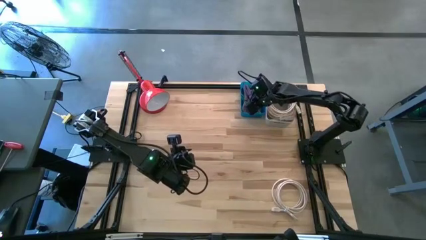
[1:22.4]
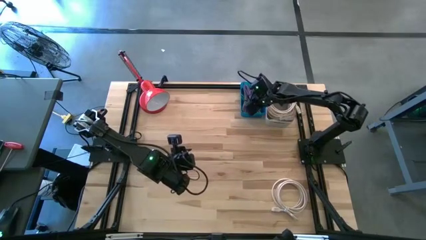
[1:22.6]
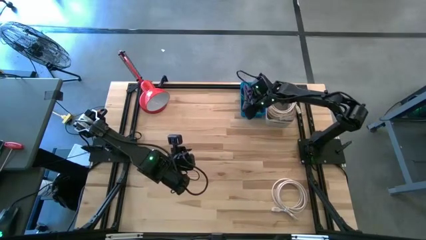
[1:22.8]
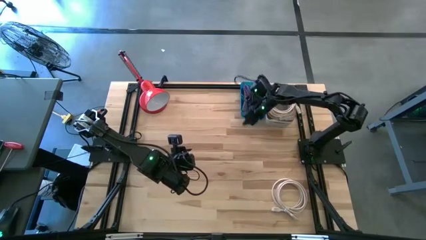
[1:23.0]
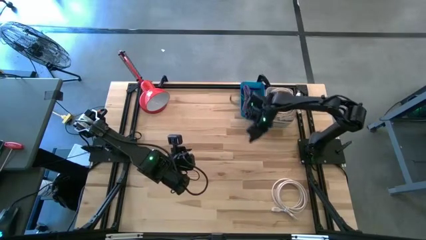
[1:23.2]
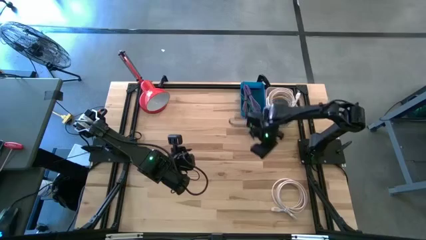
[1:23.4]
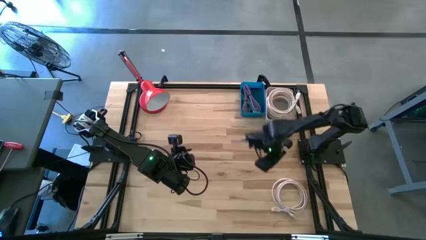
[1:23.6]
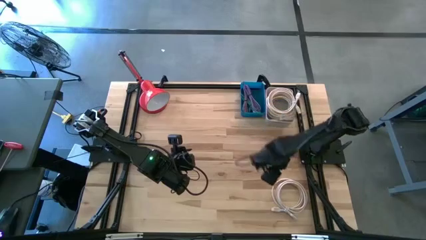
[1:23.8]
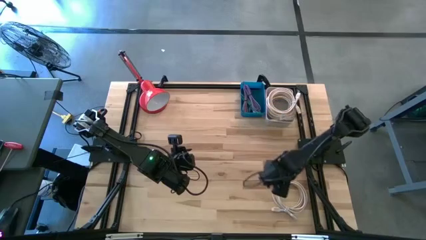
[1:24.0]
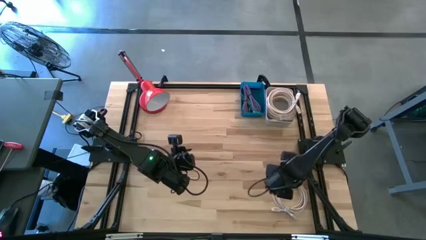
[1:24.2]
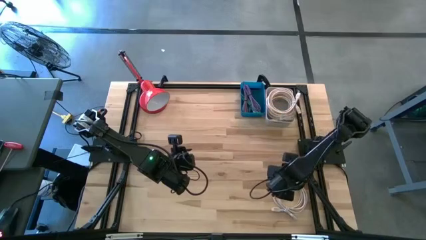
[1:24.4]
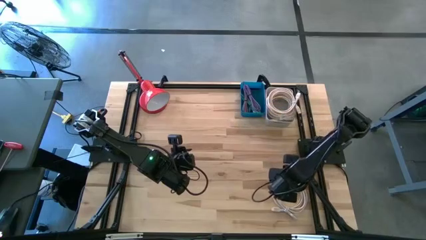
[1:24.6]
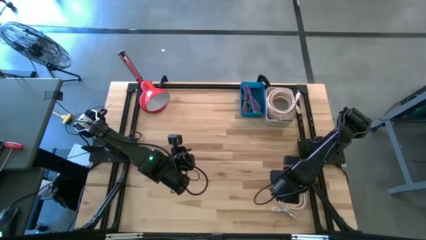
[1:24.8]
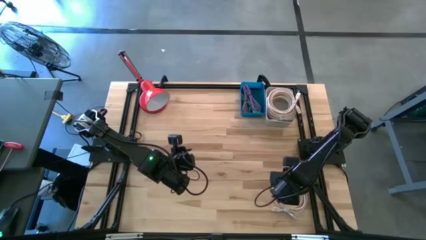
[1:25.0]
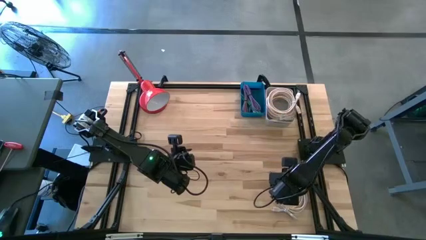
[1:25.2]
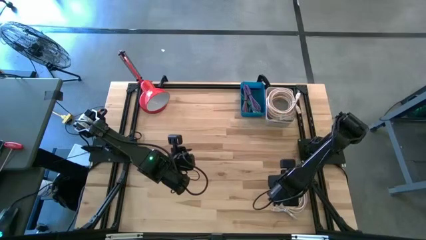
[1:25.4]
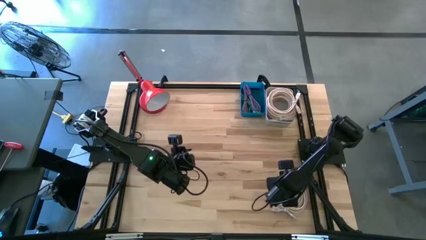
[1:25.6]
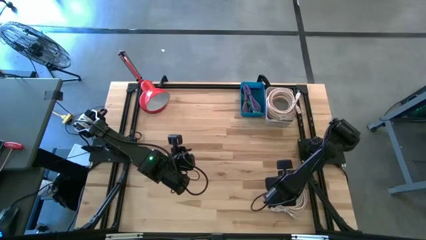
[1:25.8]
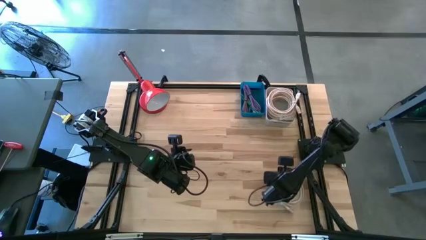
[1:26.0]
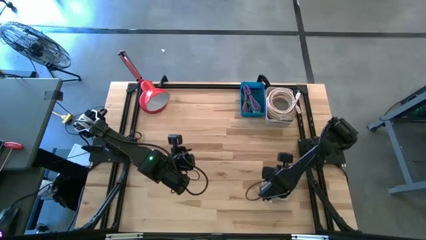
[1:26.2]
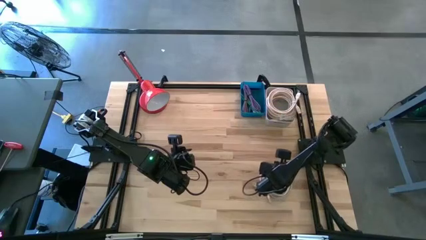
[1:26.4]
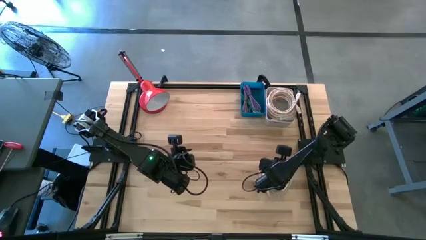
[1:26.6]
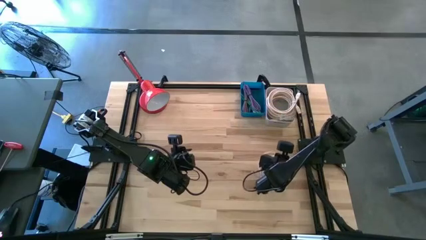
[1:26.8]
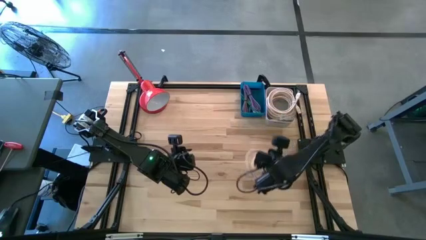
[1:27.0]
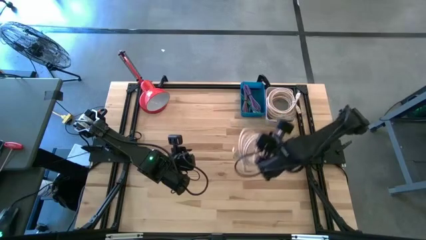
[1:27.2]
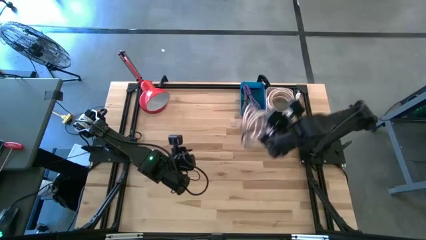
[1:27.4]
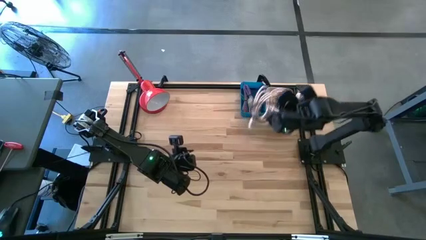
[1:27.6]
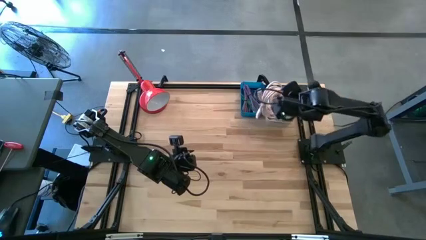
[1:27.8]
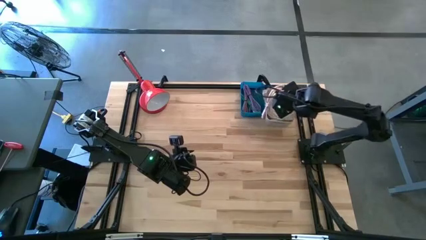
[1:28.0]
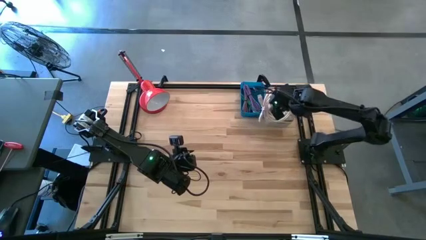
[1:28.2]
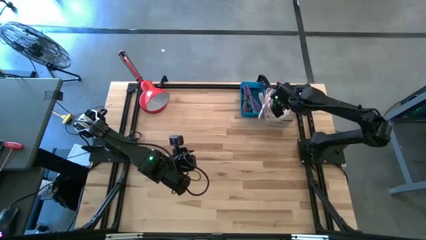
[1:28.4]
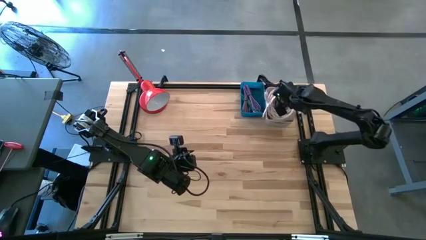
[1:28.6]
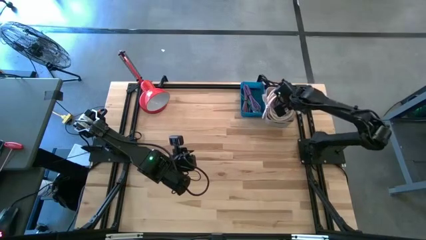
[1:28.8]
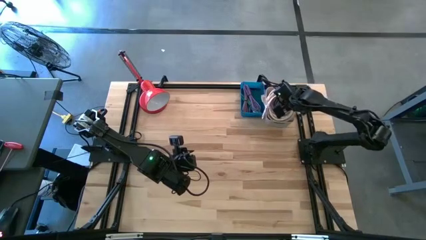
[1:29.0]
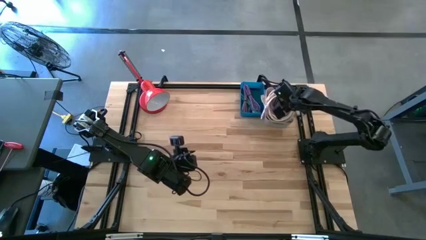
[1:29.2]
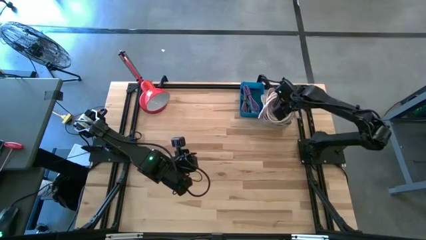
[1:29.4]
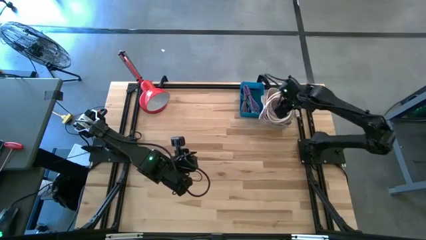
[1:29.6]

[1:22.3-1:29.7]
Task: Pick & Place USB Port
Put the white HDMI cable into the gray bin

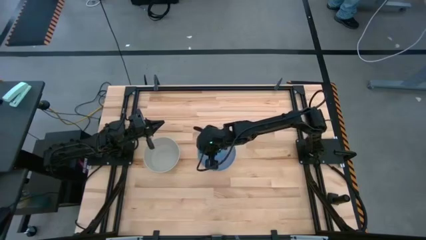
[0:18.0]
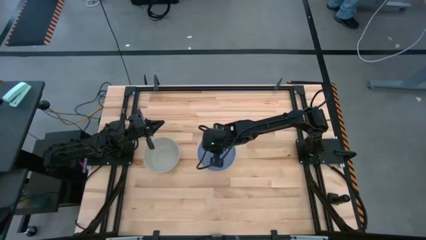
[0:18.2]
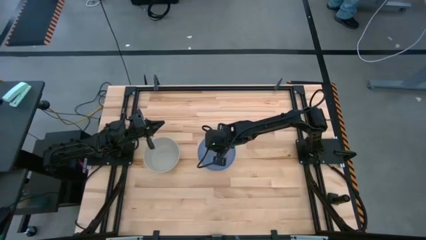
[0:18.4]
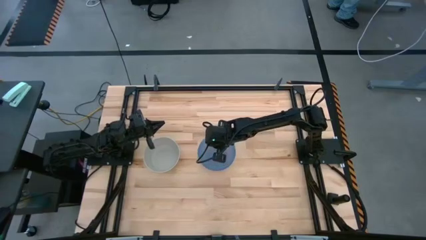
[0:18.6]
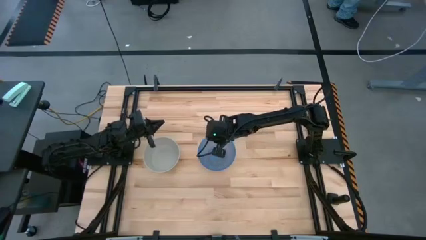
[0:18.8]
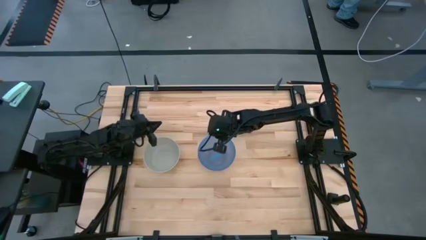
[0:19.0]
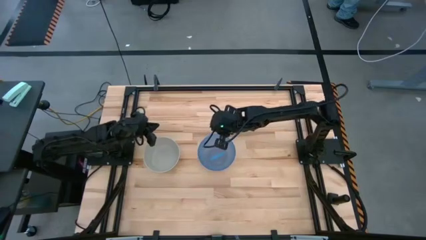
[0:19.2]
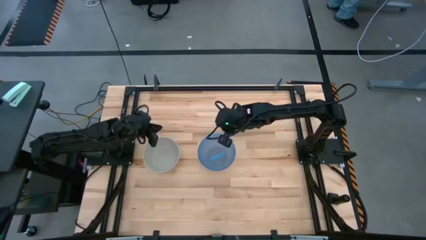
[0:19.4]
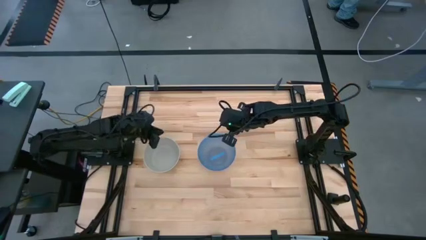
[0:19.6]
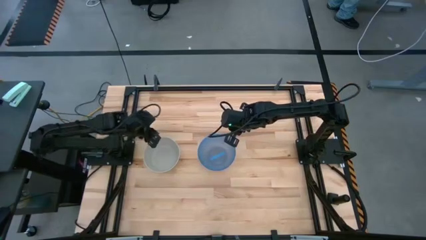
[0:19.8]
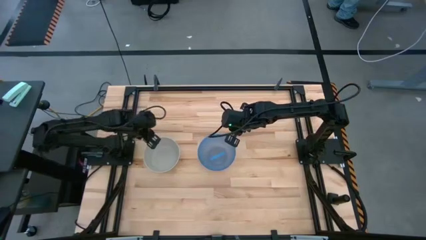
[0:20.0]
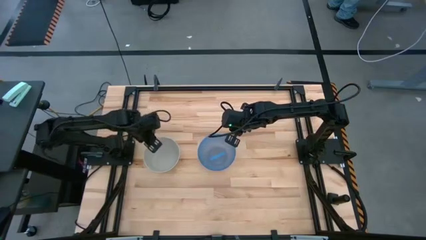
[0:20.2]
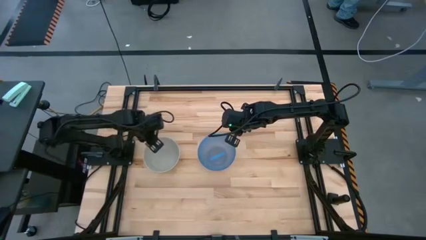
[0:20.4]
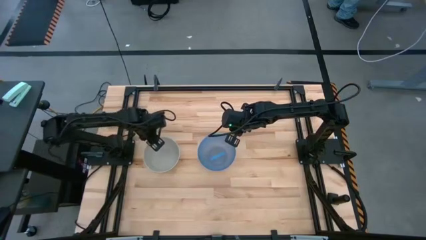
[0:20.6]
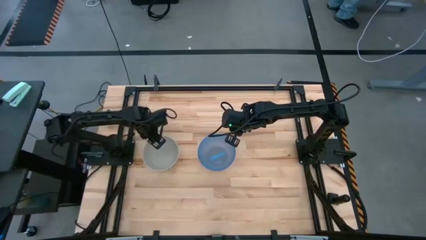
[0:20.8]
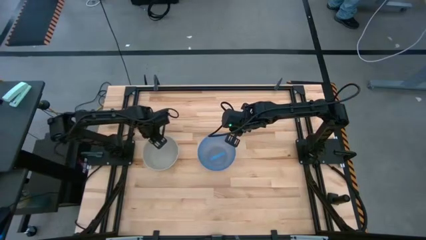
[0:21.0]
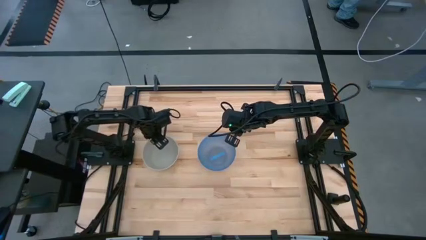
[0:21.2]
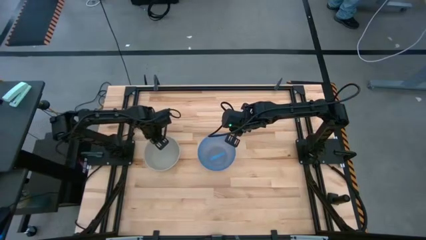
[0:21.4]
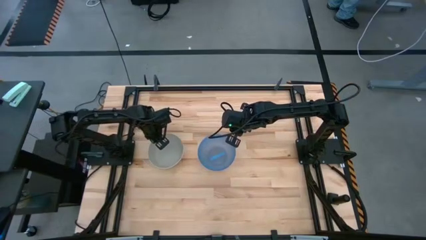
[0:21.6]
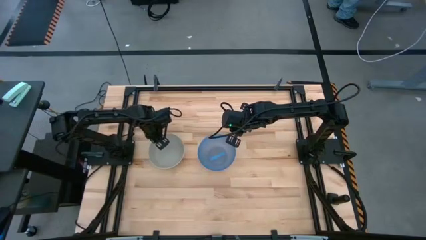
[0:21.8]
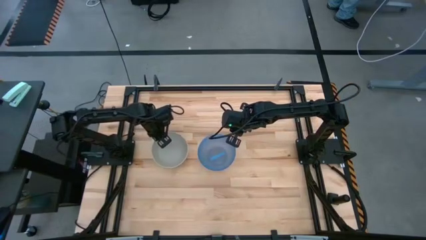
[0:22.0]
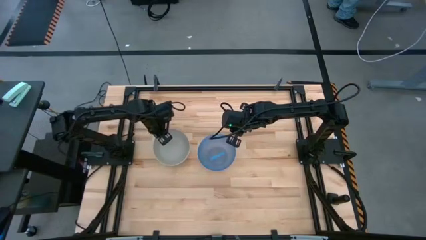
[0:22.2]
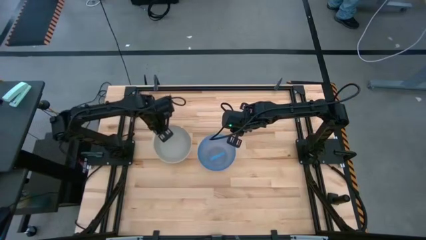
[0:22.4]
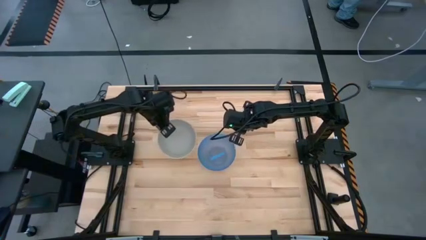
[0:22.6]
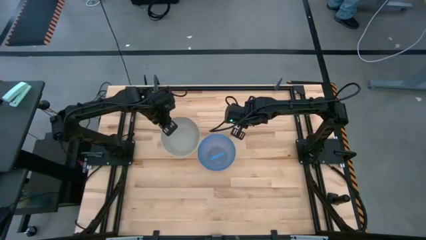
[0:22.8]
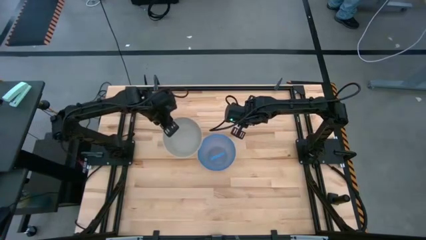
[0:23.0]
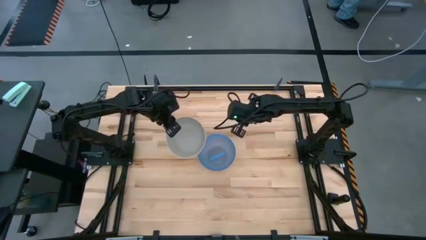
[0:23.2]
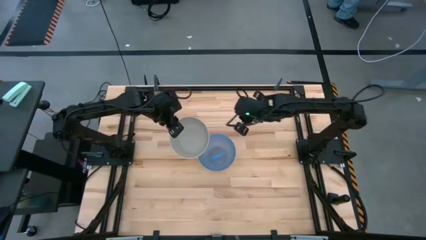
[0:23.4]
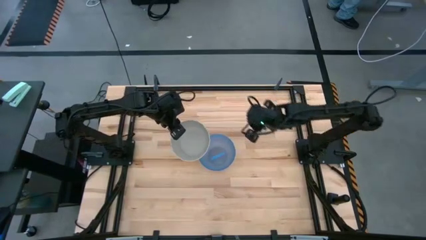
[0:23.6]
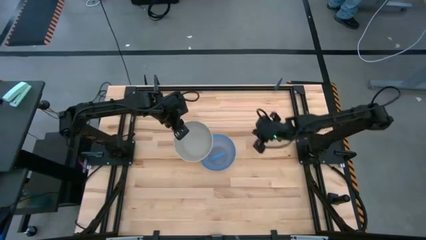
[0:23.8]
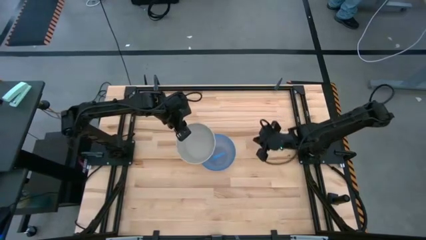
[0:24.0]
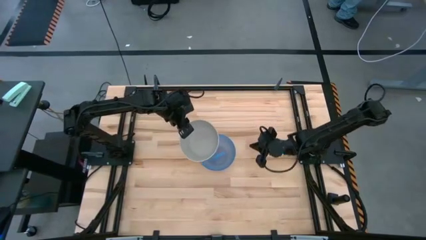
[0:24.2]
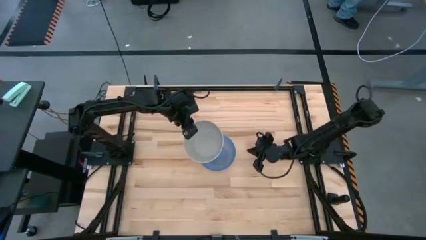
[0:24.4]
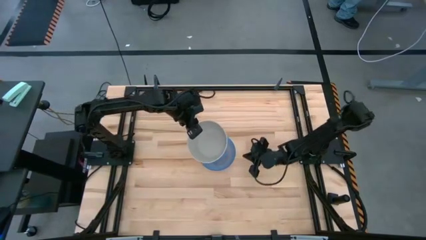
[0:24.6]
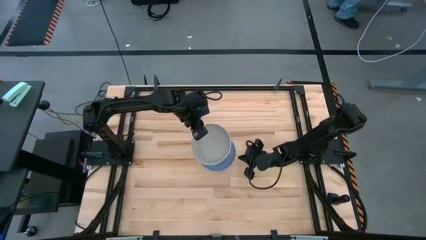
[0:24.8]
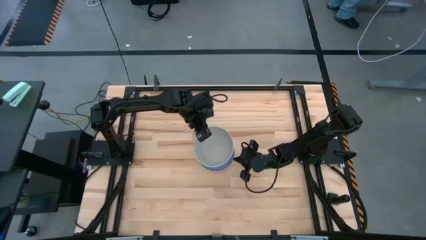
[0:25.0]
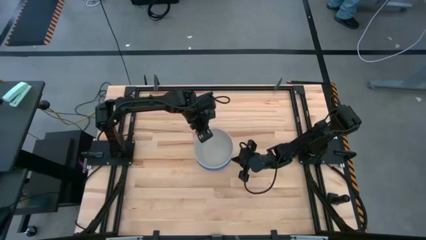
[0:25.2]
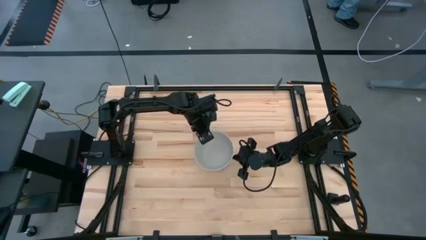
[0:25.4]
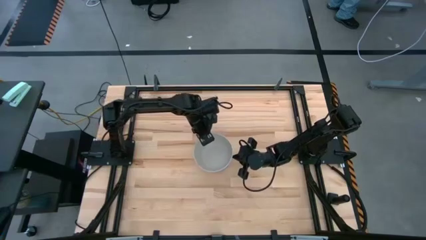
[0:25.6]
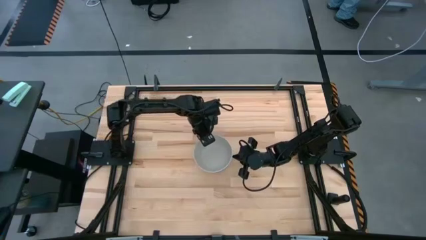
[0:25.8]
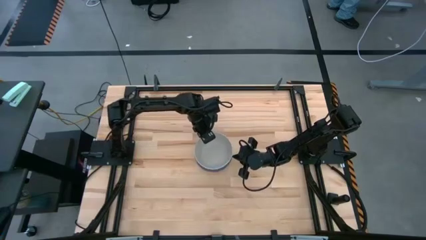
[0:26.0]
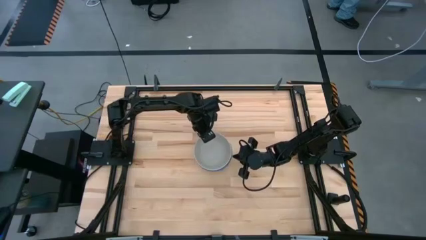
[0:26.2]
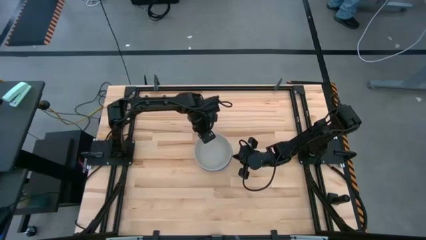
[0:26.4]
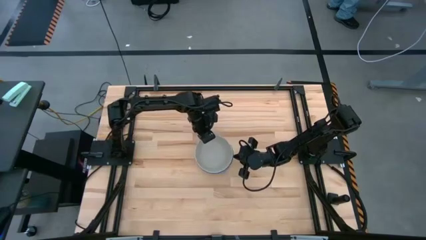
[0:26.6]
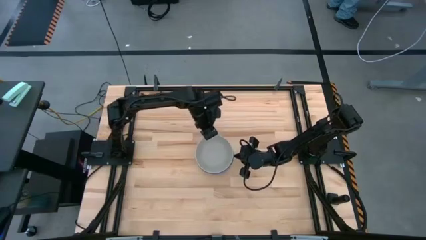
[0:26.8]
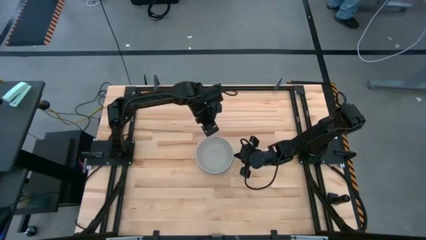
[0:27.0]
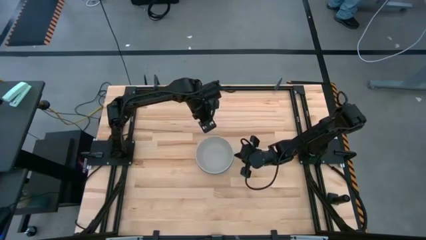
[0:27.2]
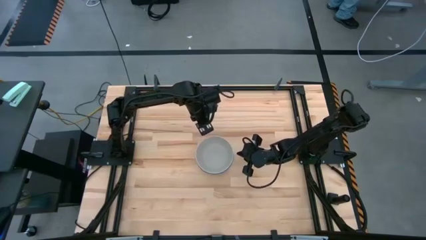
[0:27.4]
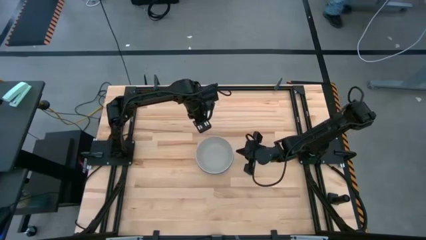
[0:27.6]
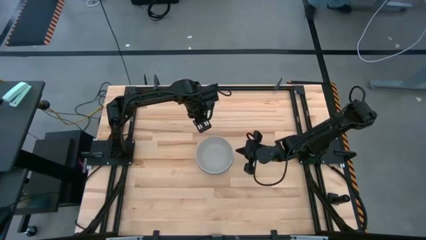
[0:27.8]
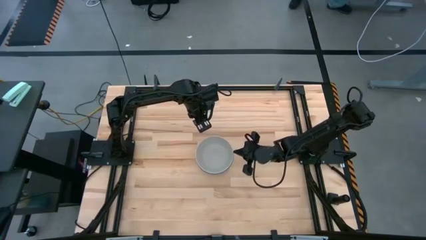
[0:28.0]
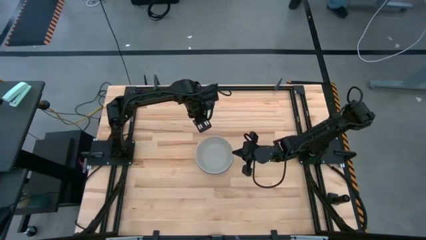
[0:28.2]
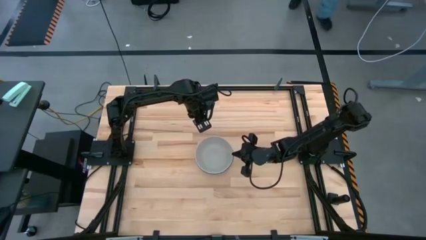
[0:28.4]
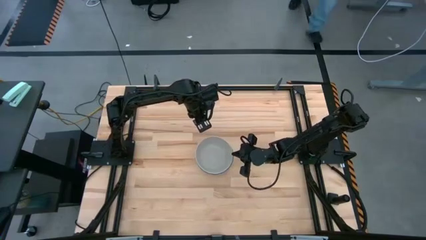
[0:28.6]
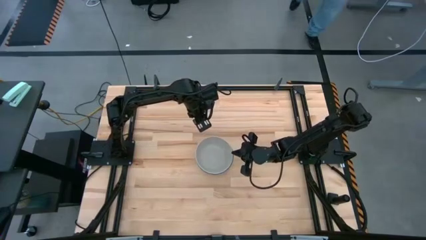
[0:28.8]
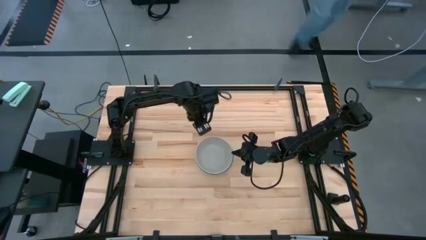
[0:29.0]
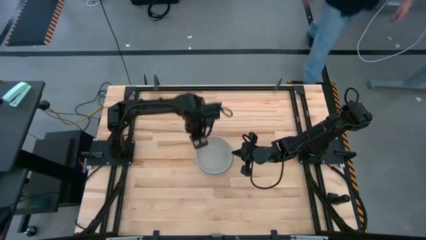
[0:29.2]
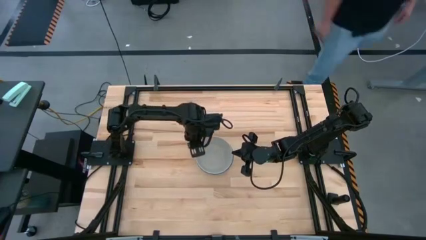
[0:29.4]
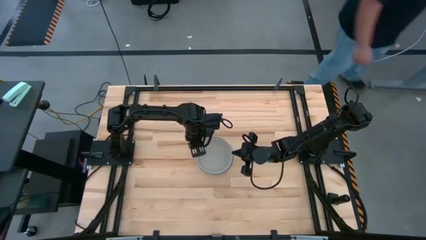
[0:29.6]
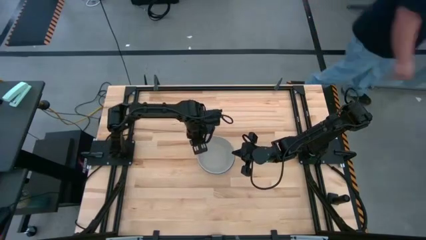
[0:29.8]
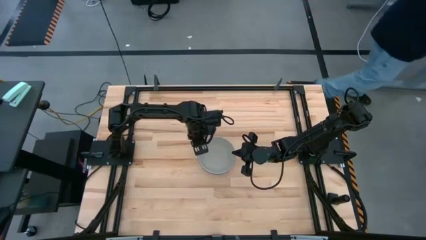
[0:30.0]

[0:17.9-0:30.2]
Task: Nest bowls inside each other
Stack the gray bowl on the blue bowl
